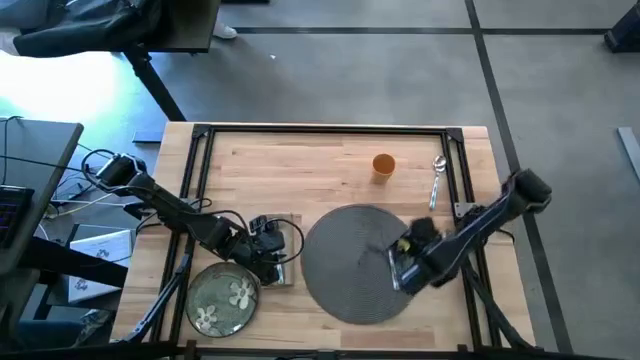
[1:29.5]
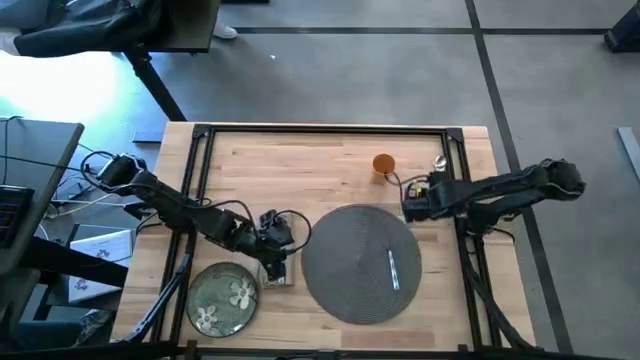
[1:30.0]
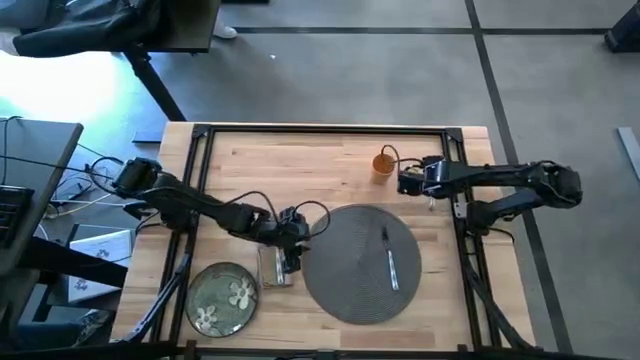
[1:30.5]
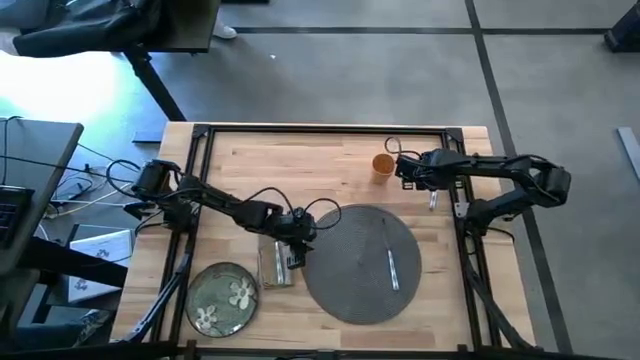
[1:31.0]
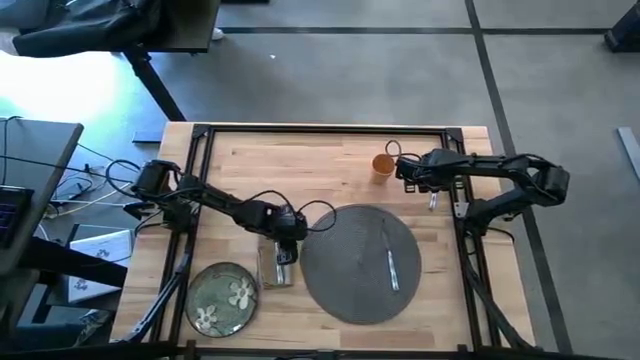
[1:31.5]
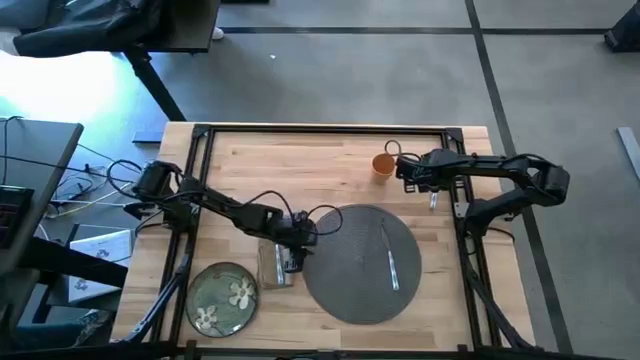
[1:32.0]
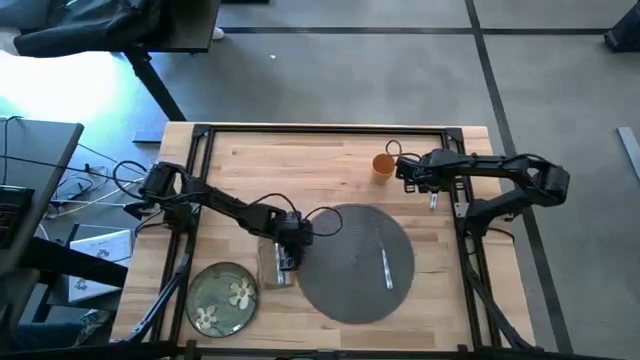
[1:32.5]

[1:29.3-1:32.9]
Task: Set table place
Adjust the gray table mat

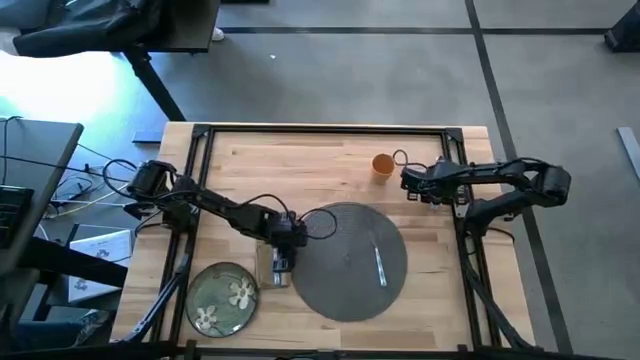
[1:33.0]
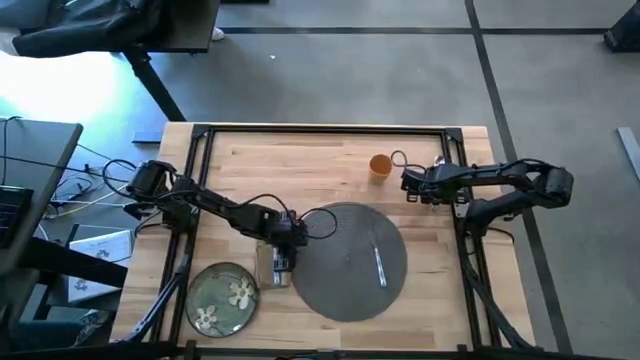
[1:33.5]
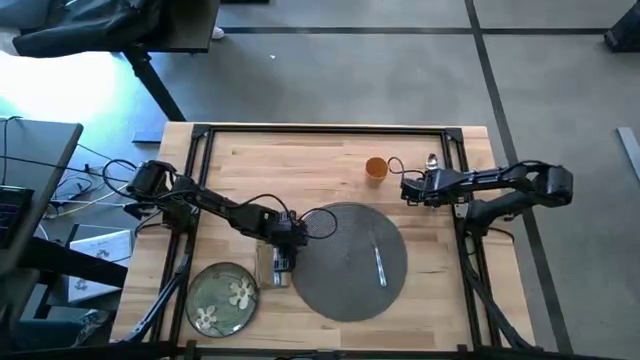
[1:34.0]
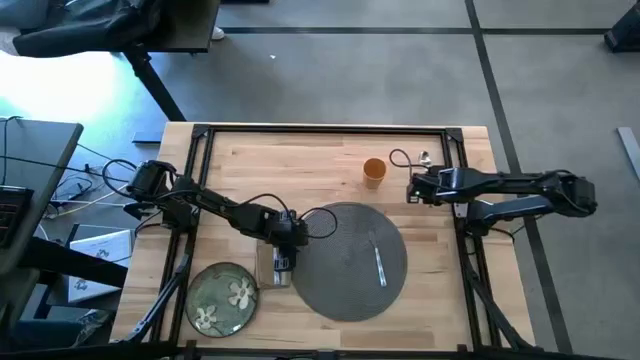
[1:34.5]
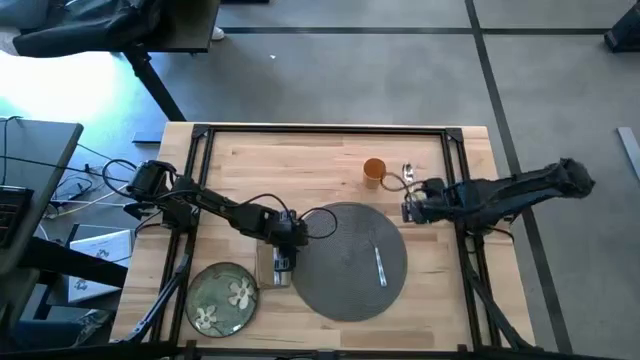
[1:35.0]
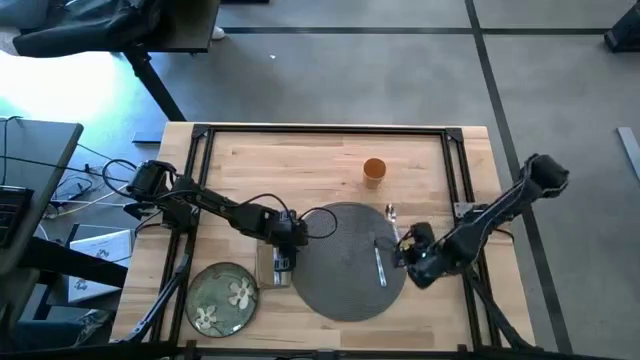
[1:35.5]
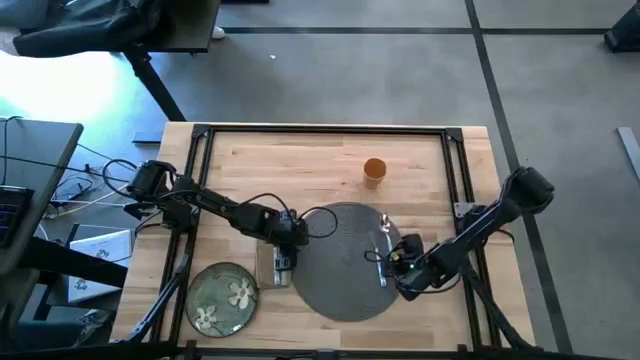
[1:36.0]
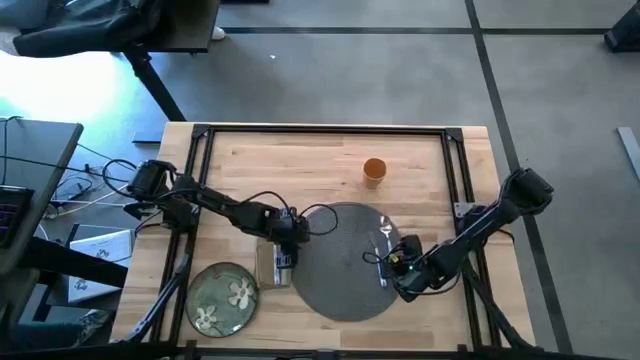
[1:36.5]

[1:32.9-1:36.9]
Put the spoon beside the table knife on the gray table mat

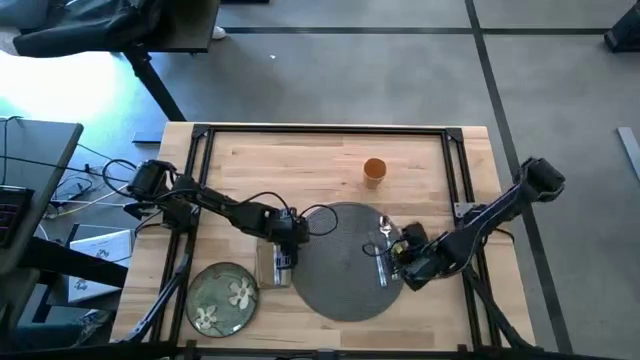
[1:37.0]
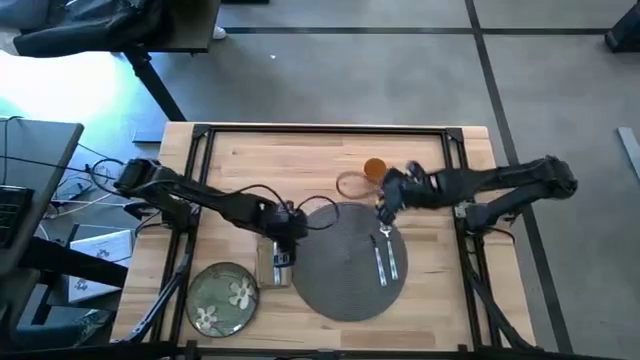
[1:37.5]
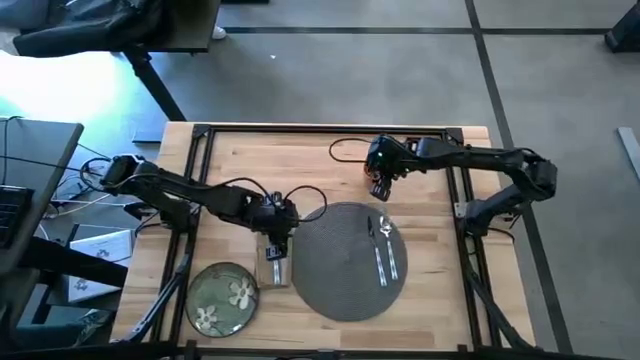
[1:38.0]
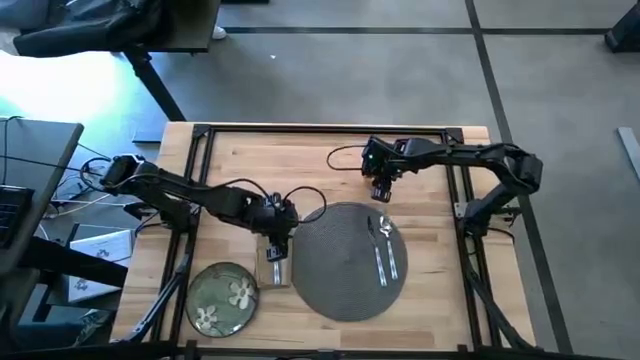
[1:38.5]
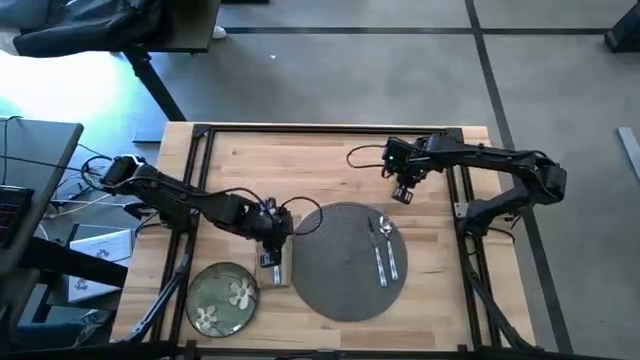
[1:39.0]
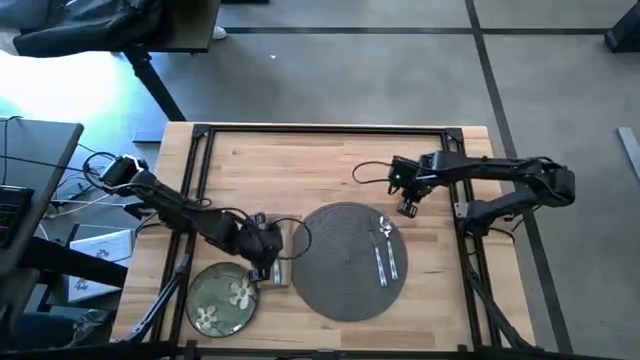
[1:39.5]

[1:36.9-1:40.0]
Adjust the yellow cup

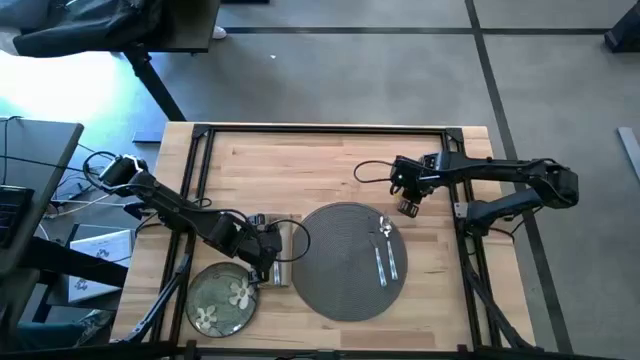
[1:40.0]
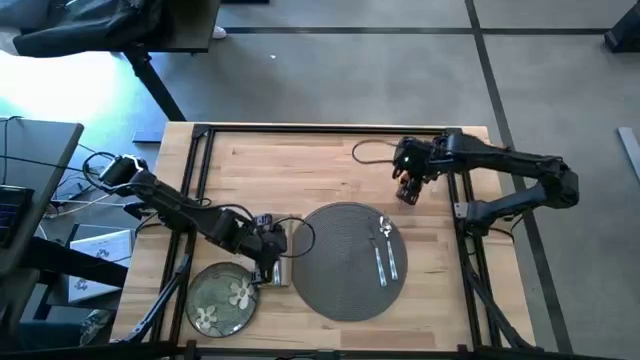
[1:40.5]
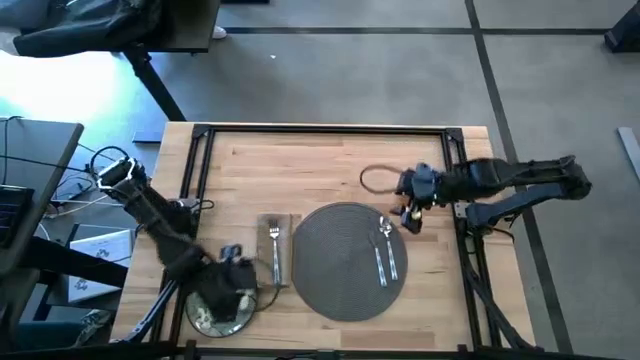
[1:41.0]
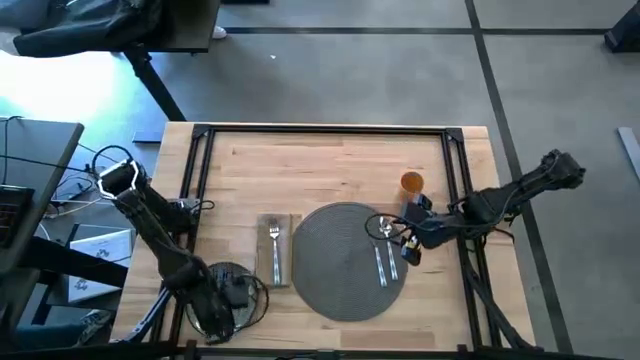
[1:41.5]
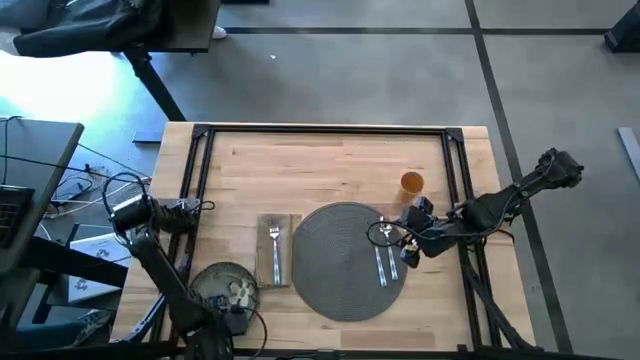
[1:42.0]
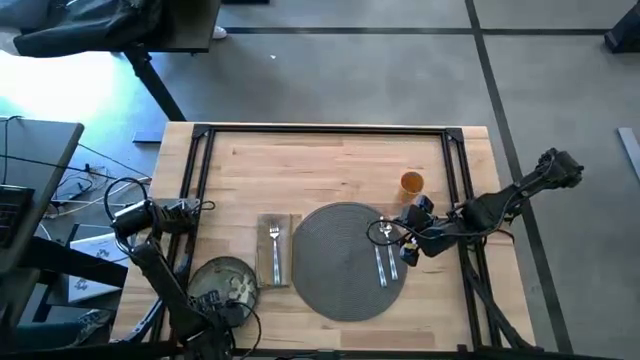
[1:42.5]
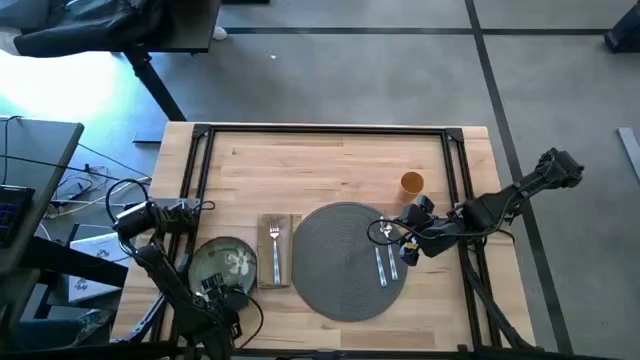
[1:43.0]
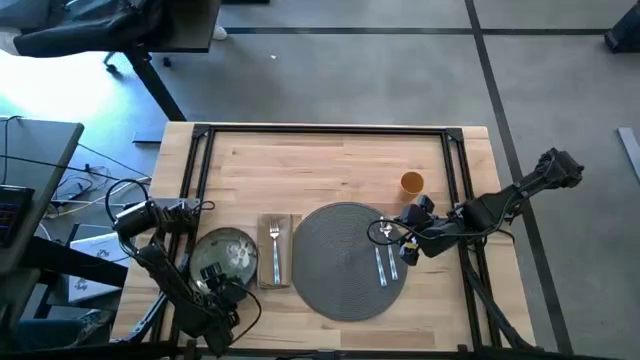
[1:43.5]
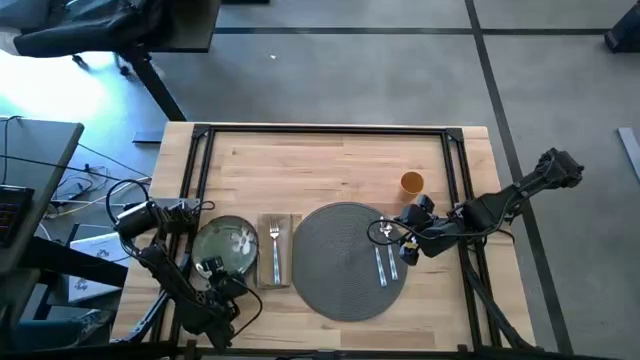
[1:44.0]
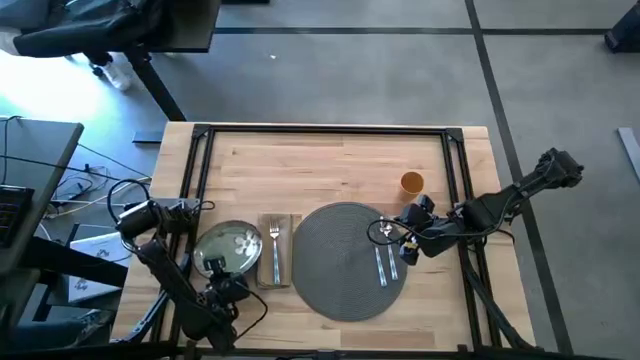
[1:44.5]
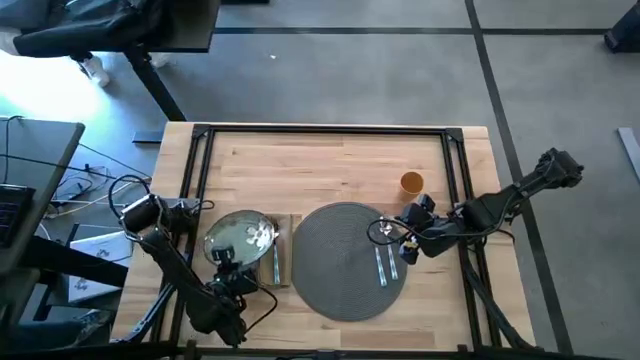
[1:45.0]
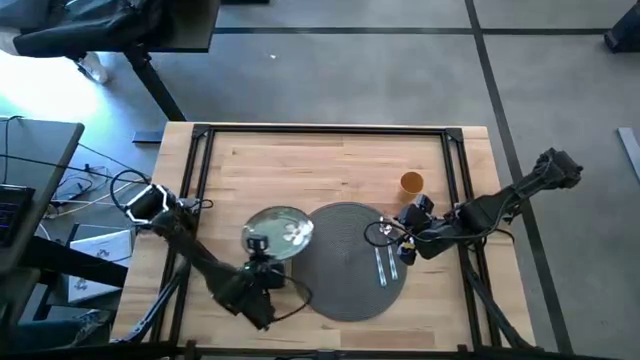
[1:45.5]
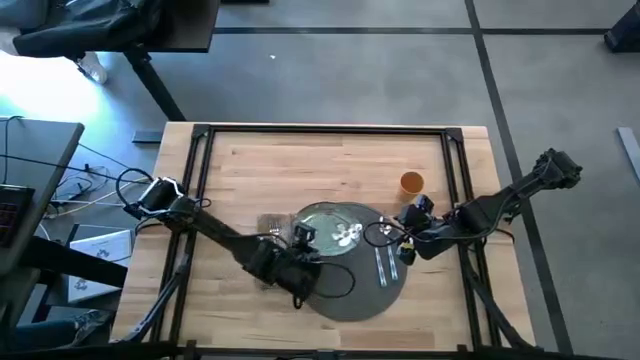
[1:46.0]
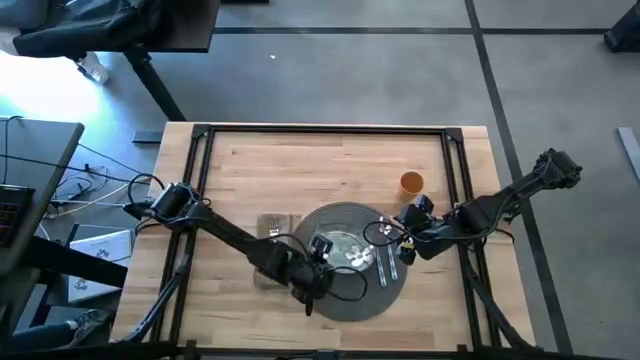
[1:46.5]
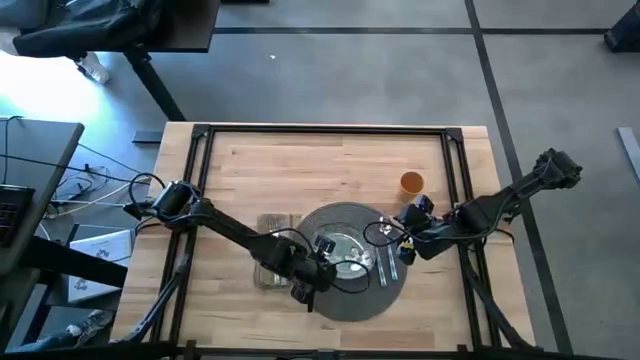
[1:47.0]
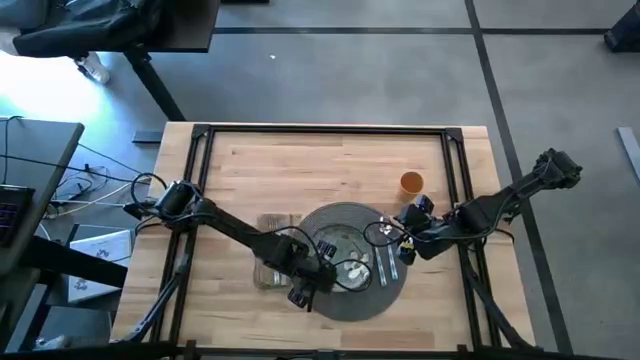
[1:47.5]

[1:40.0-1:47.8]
Put the green patterned plate on the table mat

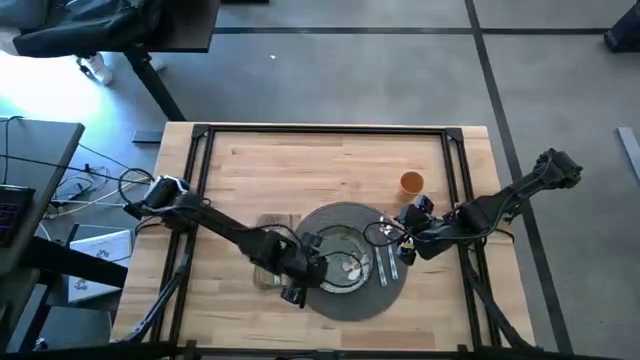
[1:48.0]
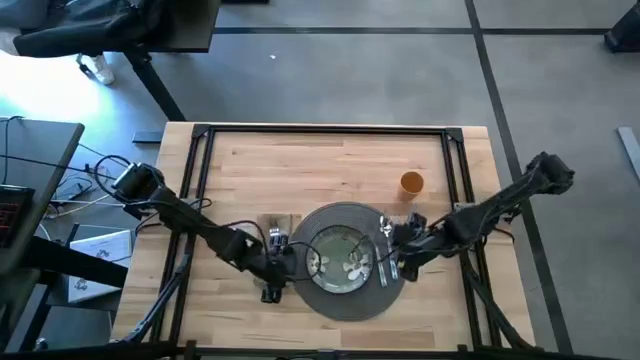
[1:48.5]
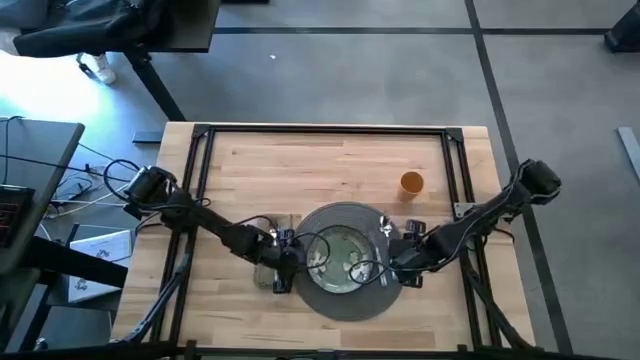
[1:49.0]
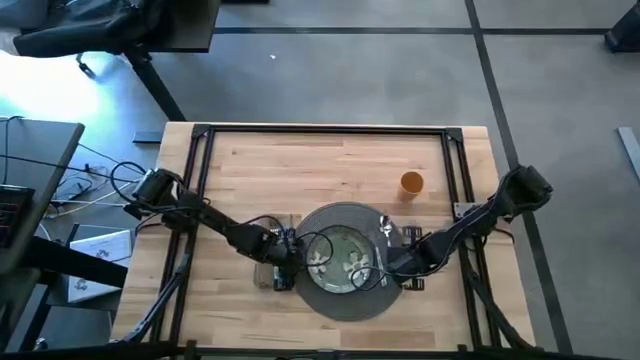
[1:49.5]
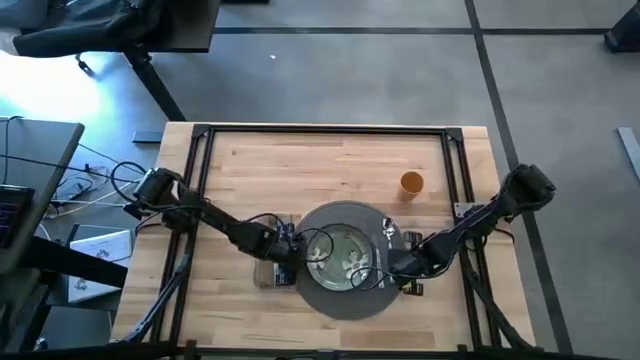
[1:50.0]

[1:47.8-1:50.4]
Adjust the gray table mat

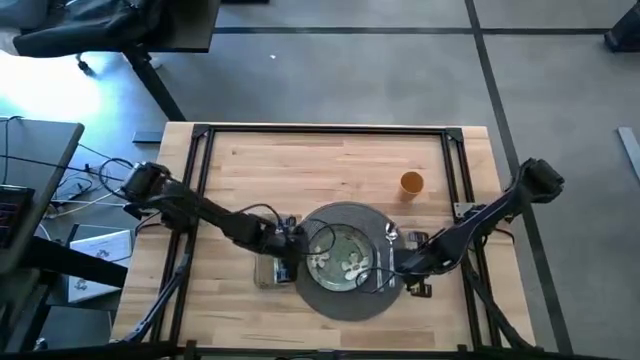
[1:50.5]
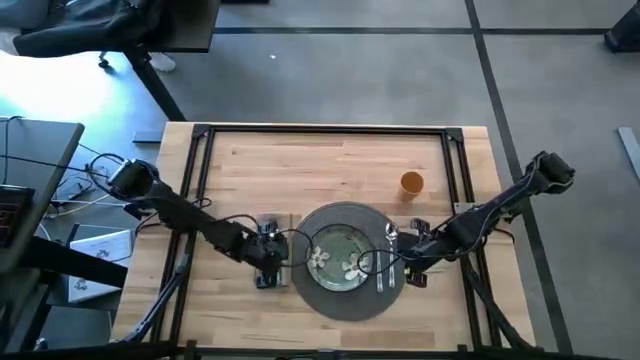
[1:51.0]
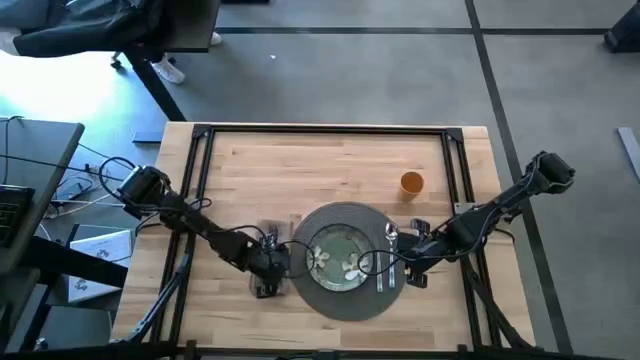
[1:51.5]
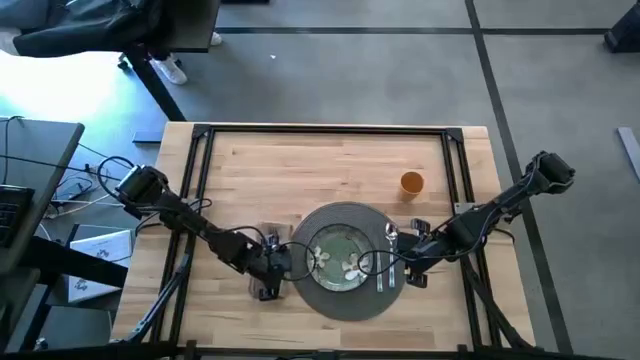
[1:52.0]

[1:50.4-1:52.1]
Adjust the brown napkin
